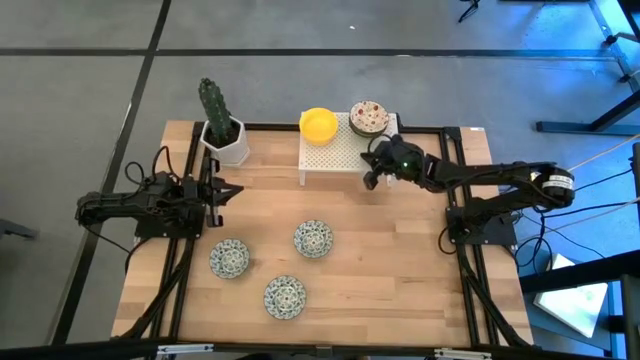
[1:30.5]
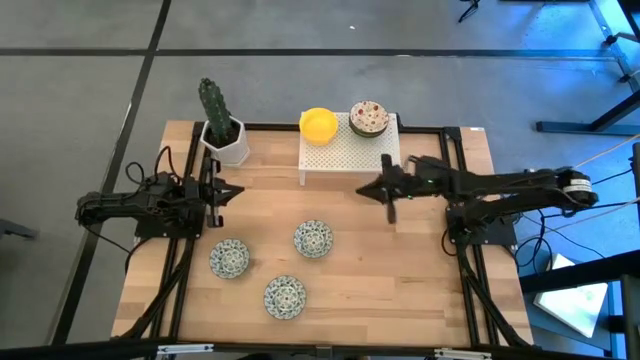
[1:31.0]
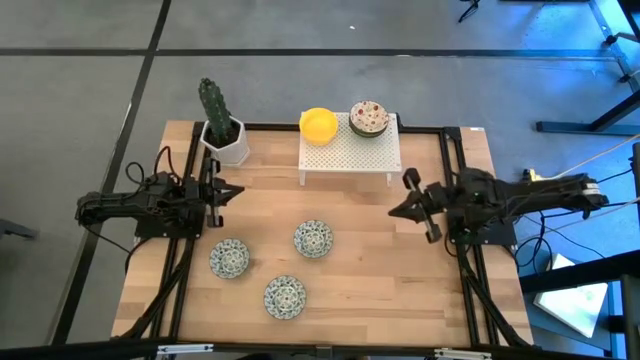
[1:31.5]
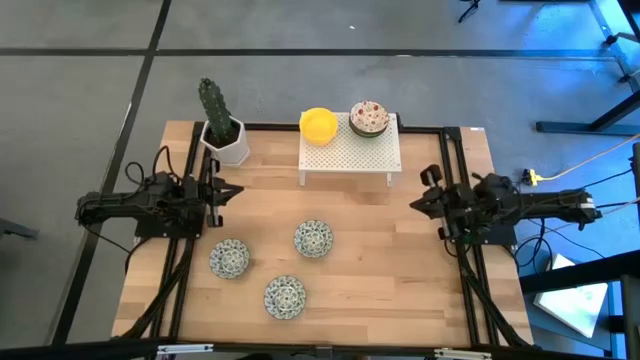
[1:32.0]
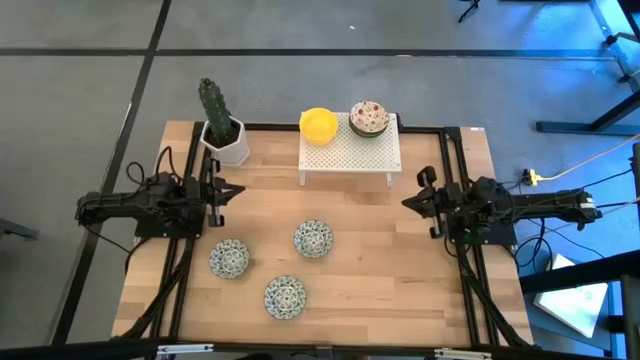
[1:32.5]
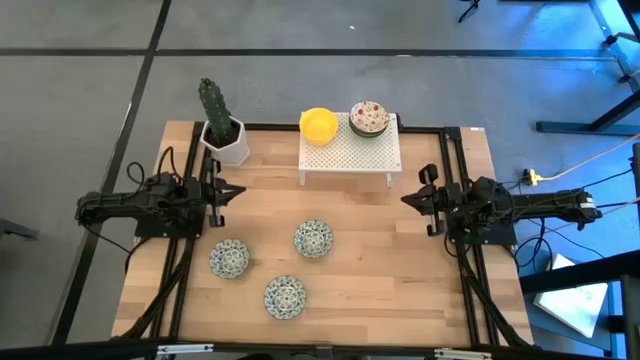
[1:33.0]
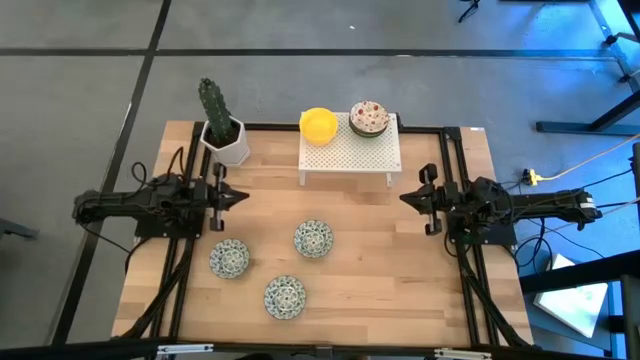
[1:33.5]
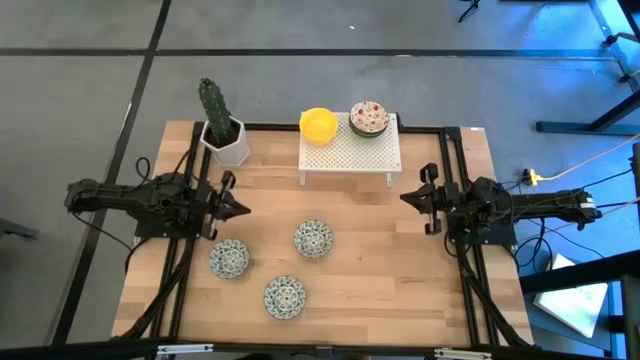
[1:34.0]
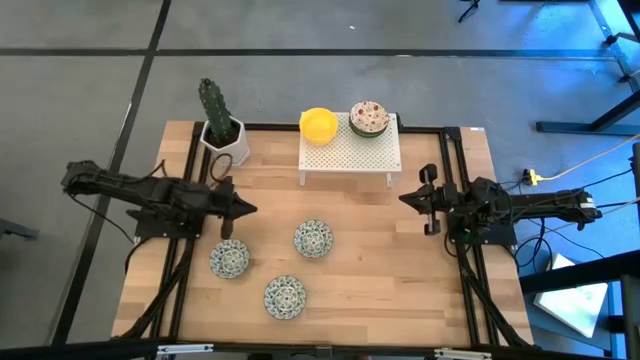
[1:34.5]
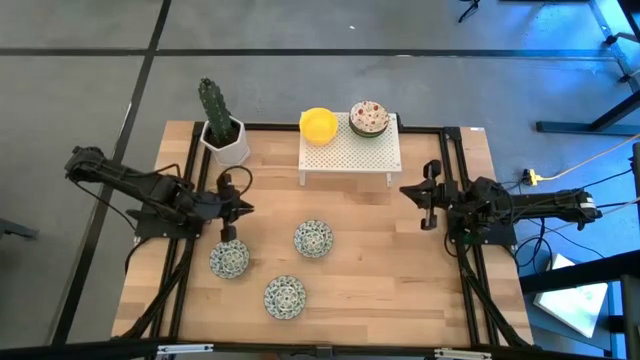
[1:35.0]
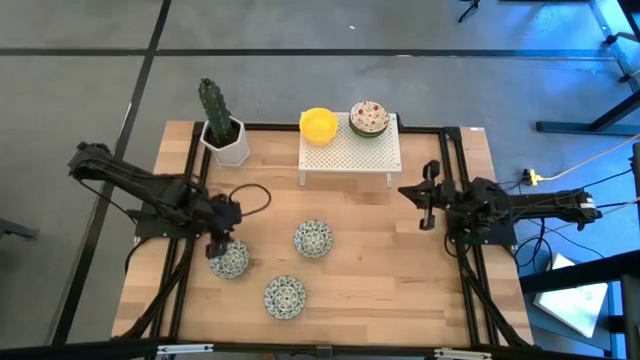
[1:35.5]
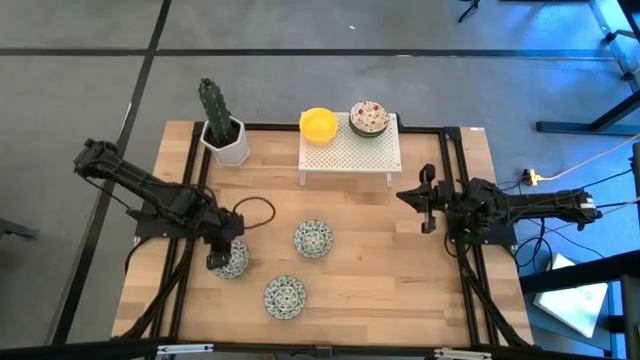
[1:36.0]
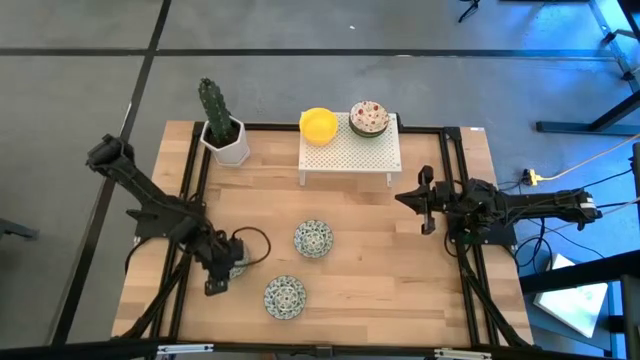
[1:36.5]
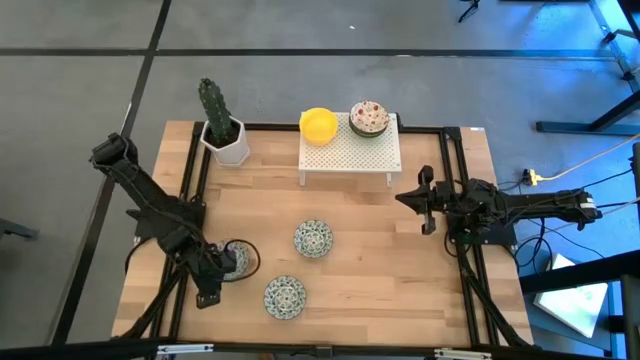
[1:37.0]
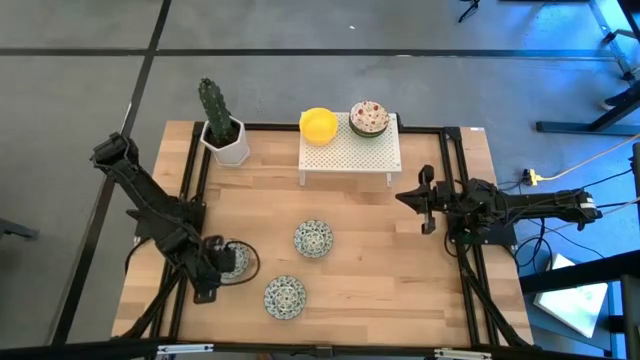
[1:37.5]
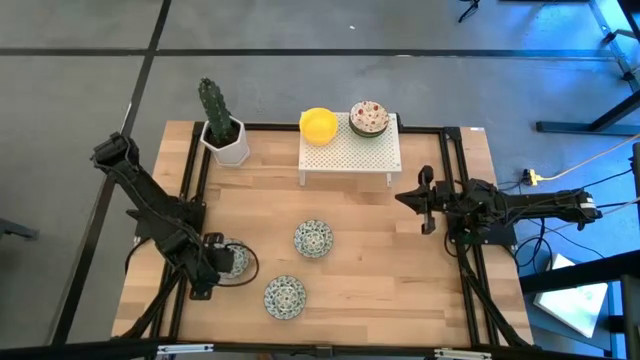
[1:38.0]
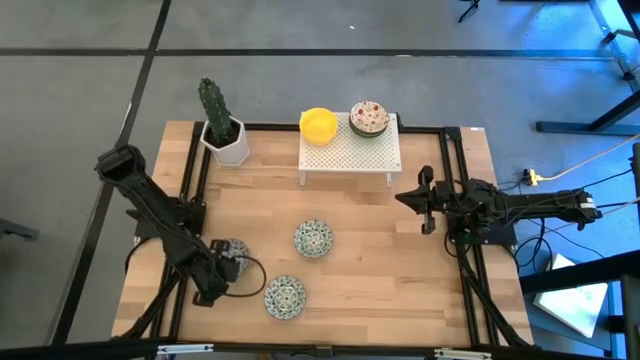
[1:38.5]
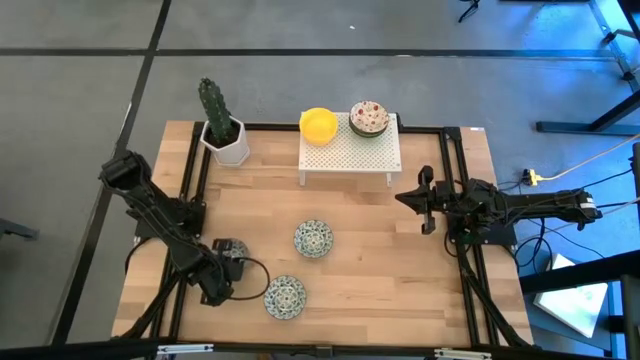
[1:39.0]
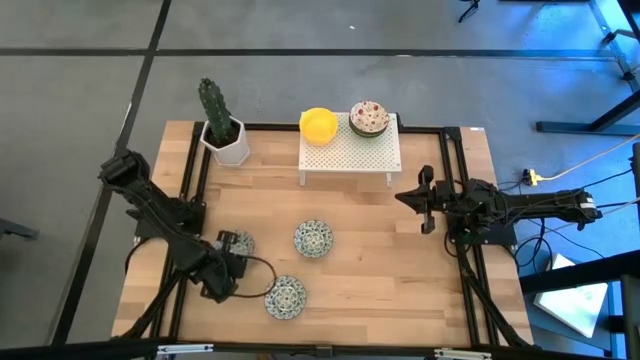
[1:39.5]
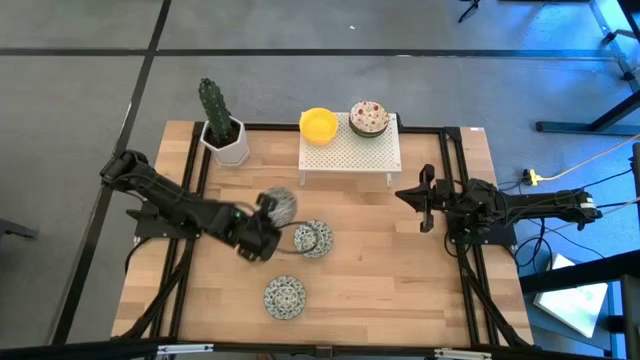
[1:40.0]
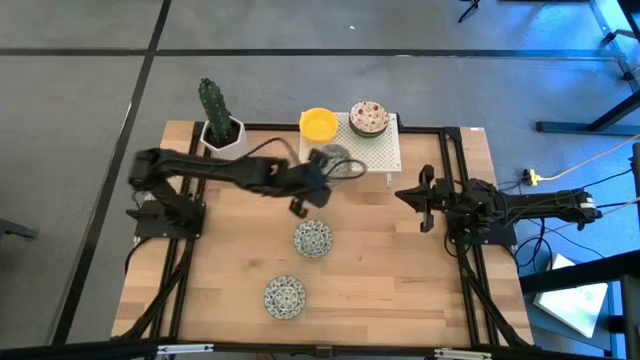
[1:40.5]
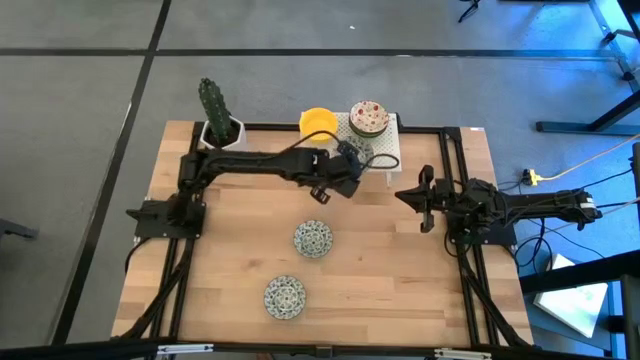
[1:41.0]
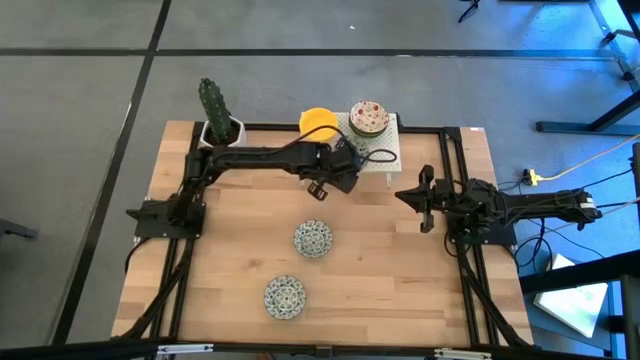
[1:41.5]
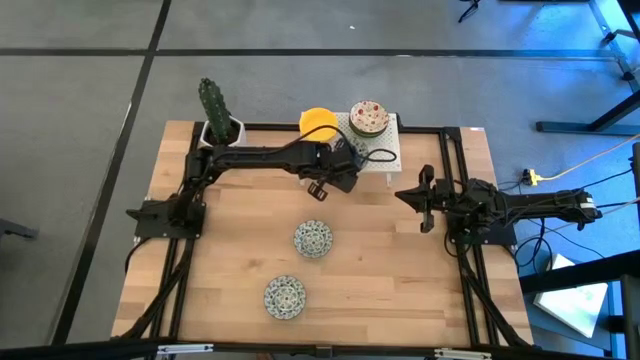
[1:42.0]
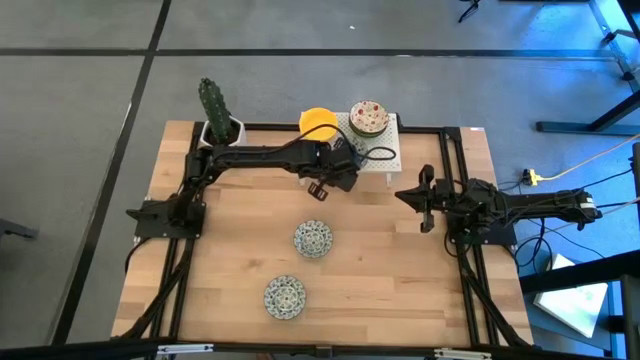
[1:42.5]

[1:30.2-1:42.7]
Task: Pick & Place Mini bowls
Put the middle left blue bowl on the shelf

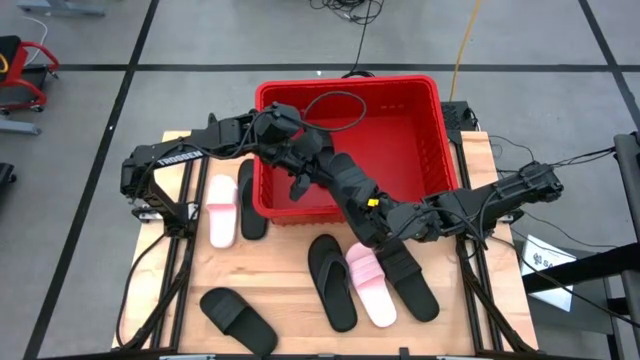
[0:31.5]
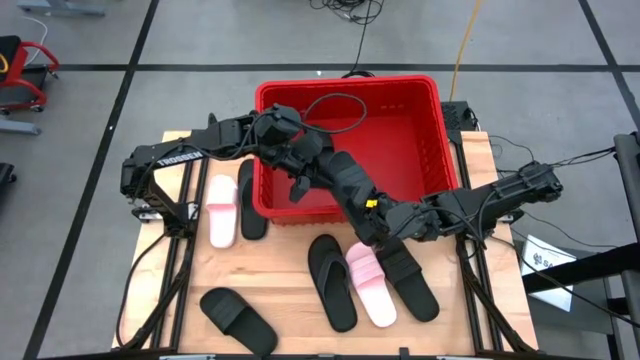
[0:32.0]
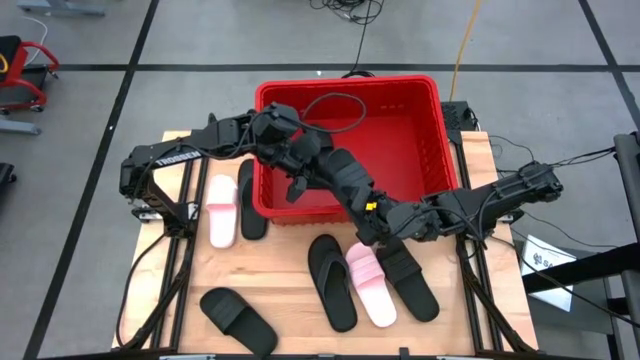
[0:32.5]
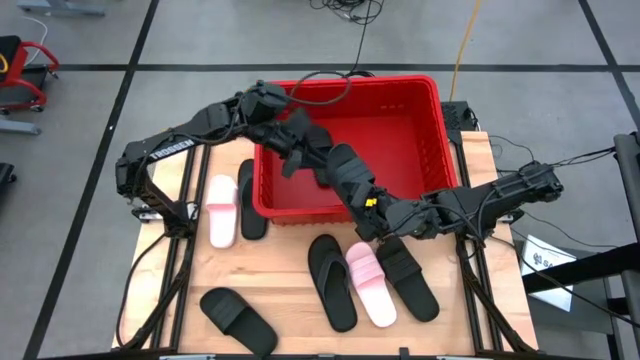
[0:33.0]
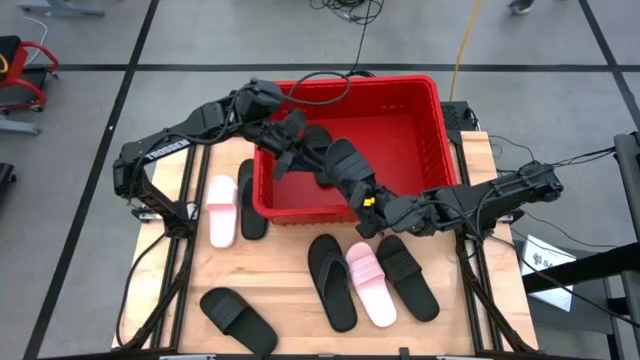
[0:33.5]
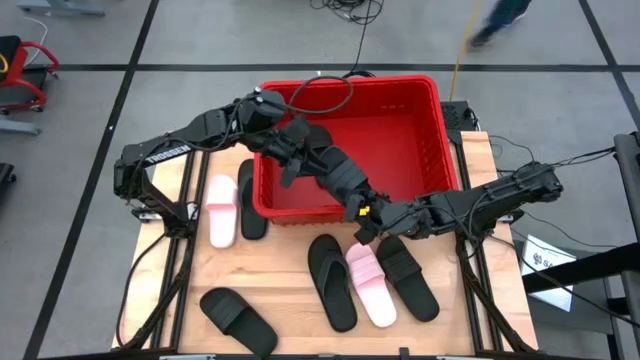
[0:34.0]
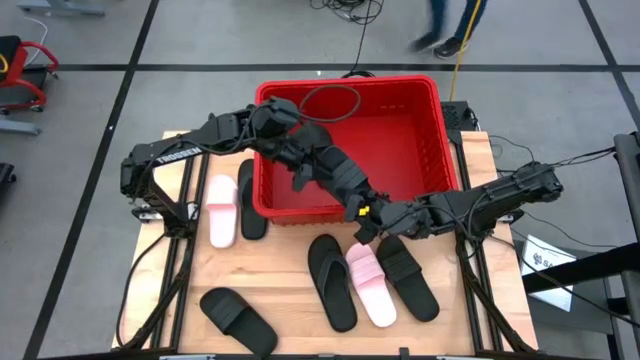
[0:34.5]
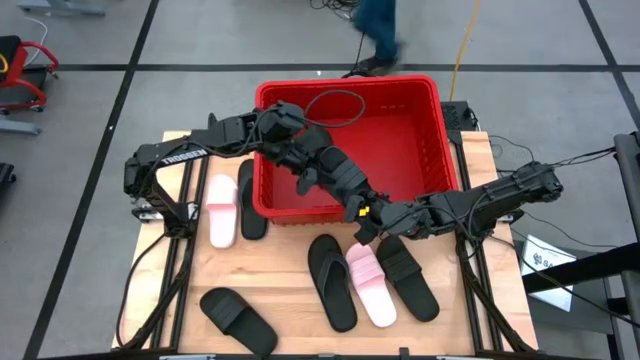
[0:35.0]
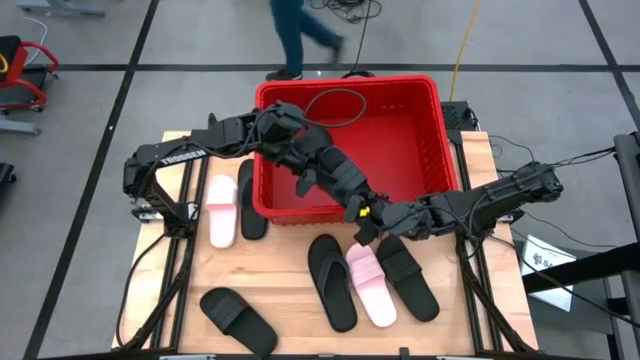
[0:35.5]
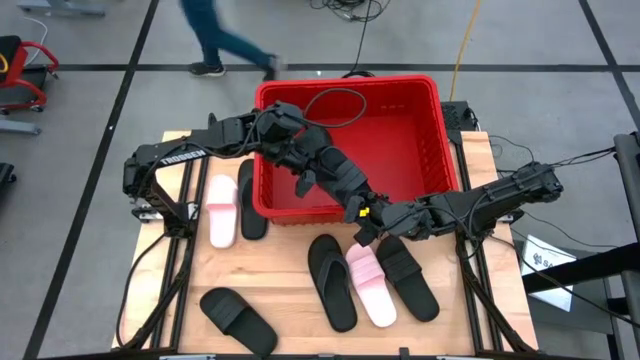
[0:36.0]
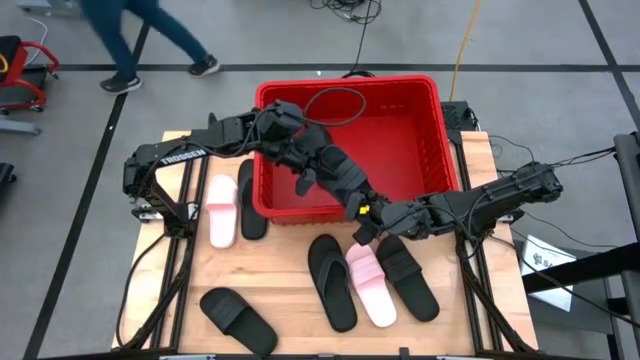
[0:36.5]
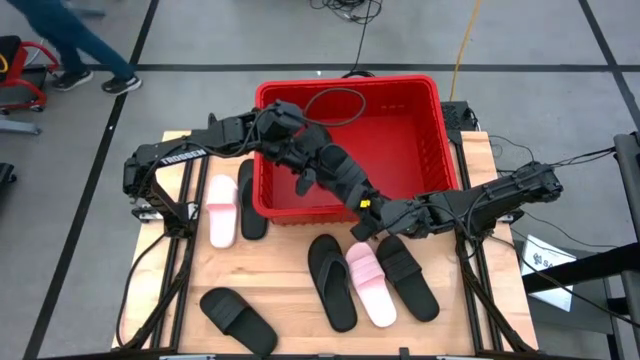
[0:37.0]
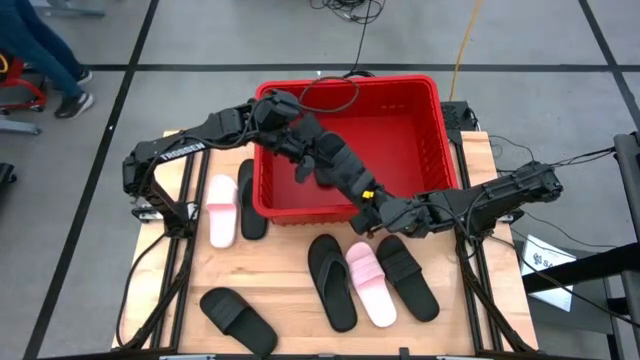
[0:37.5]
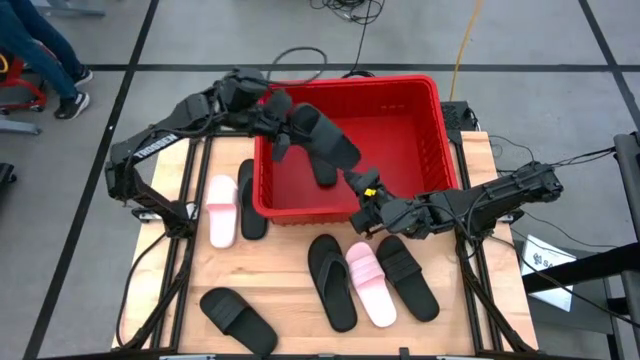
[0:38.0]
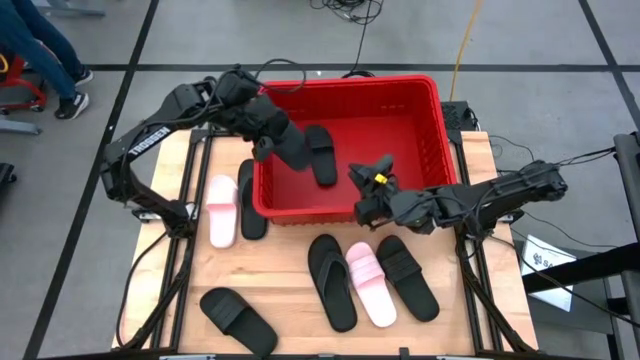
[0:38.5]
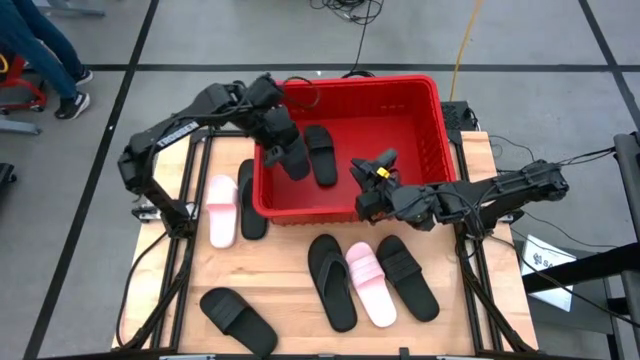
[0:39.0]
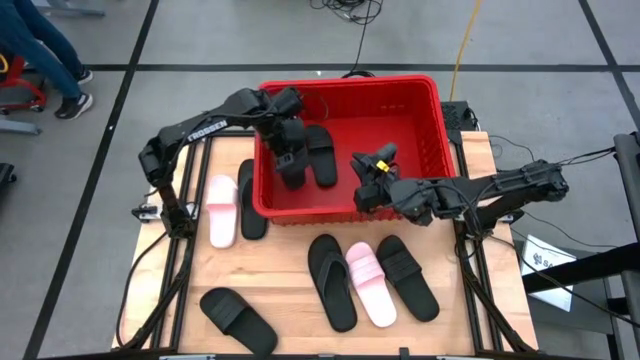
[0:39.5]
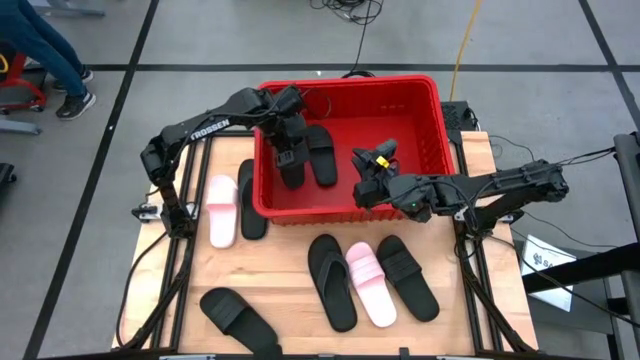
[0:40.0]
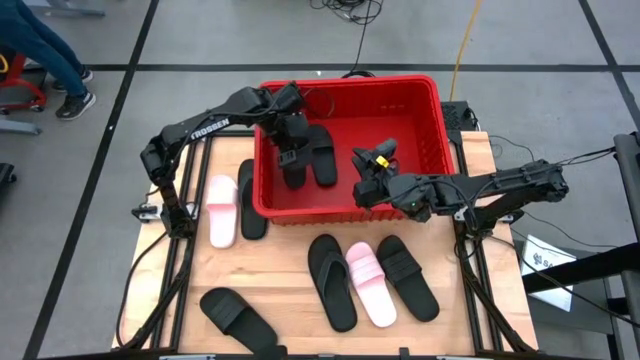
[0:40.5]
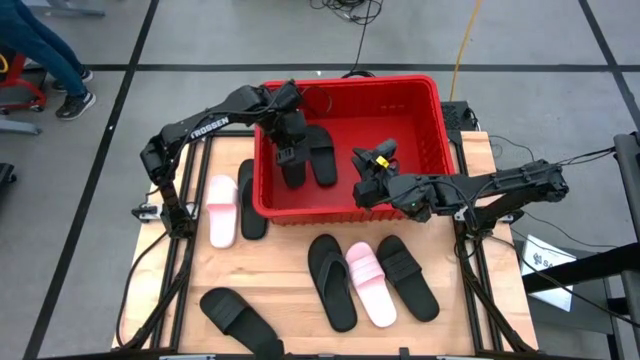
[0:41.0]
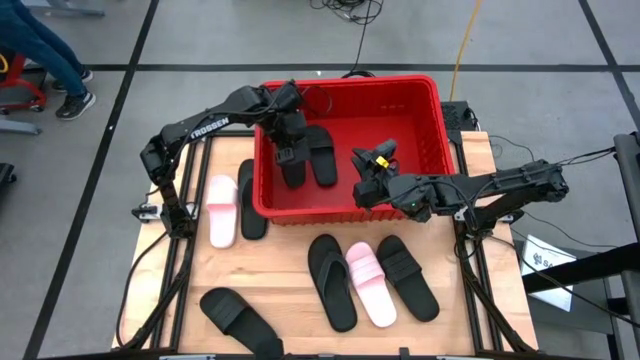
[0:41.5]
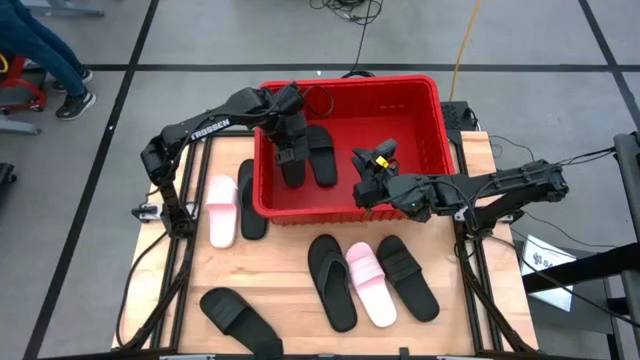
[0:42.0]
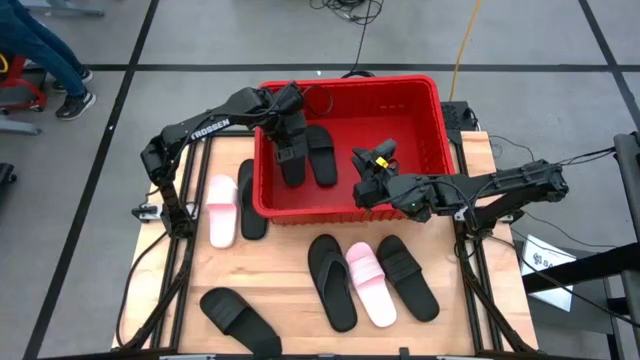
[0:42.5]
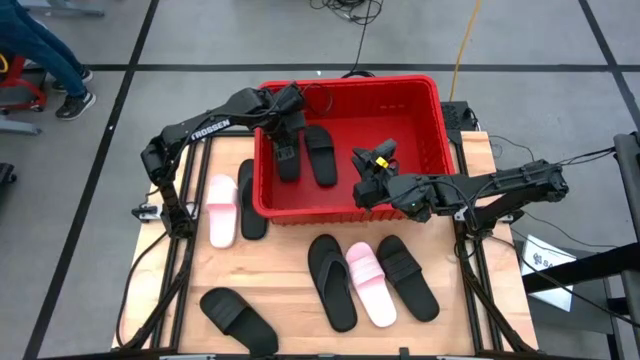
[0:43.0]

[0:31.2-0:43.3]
Task: Pick and place slides into bin
Put the right black slide into the red bin
